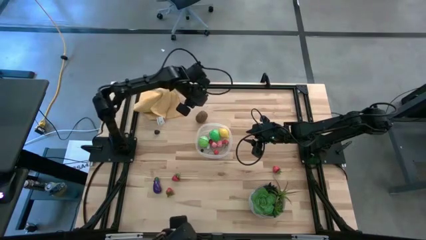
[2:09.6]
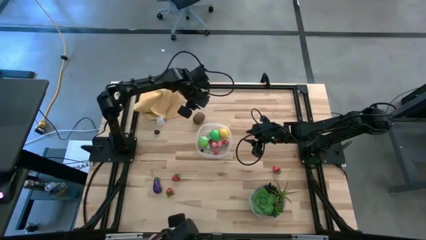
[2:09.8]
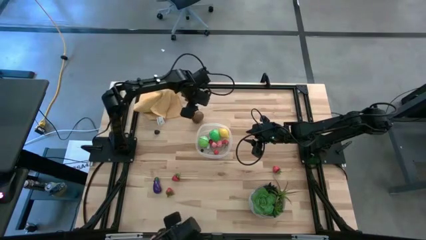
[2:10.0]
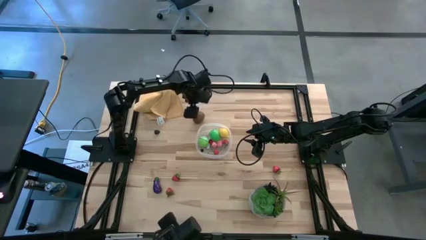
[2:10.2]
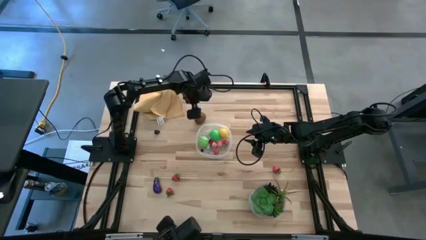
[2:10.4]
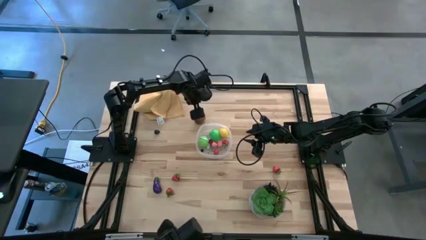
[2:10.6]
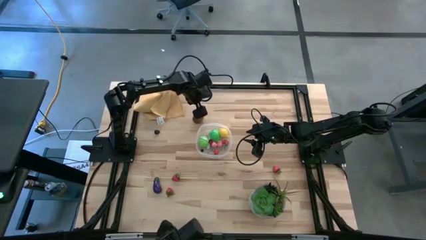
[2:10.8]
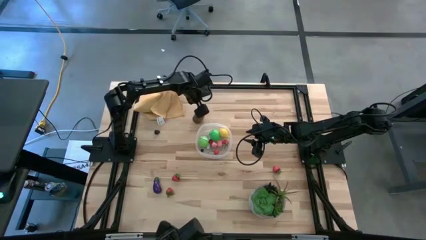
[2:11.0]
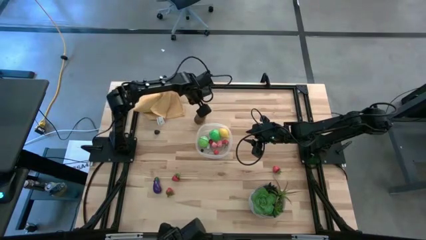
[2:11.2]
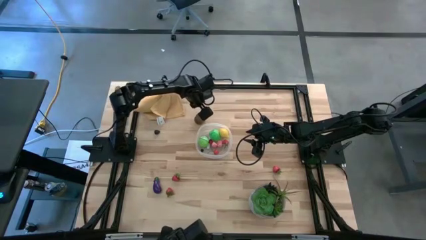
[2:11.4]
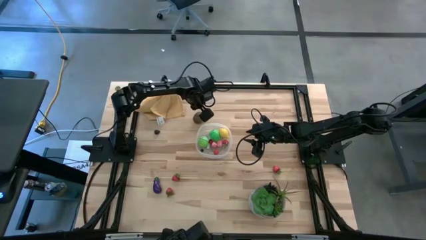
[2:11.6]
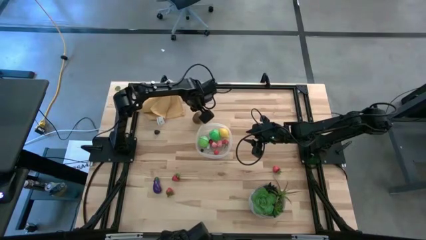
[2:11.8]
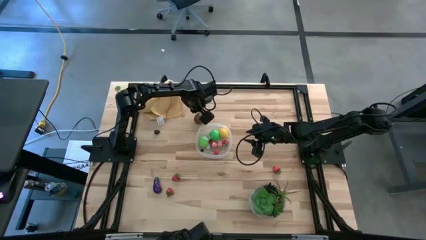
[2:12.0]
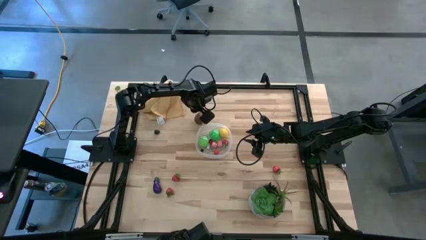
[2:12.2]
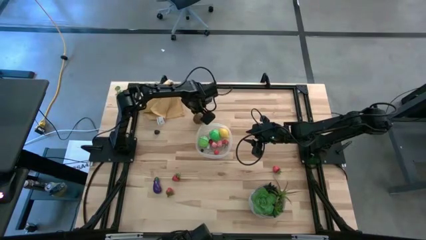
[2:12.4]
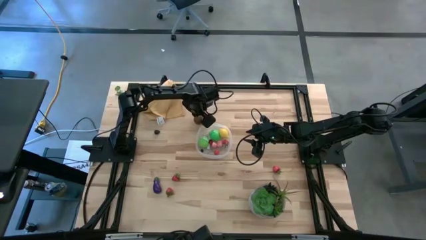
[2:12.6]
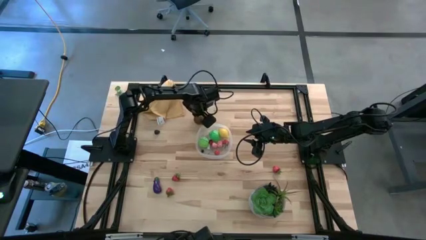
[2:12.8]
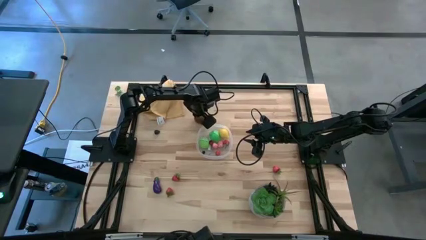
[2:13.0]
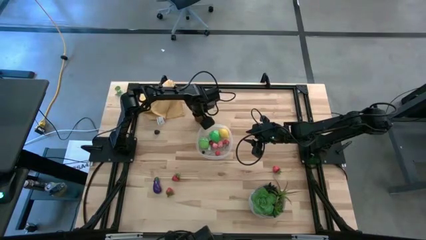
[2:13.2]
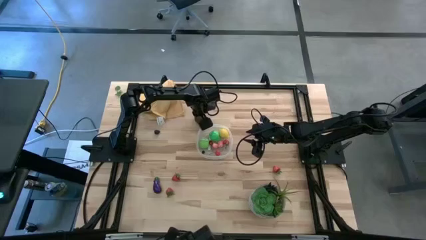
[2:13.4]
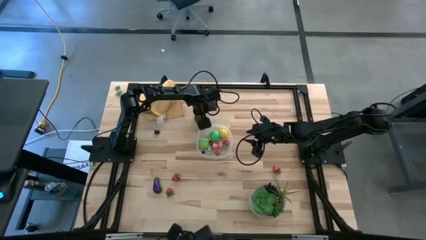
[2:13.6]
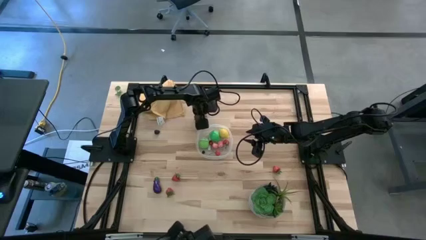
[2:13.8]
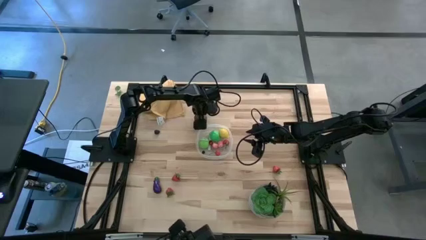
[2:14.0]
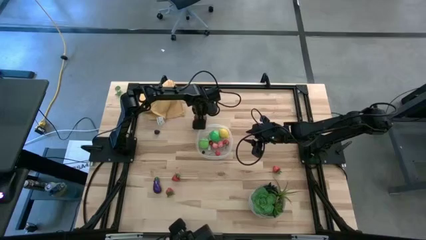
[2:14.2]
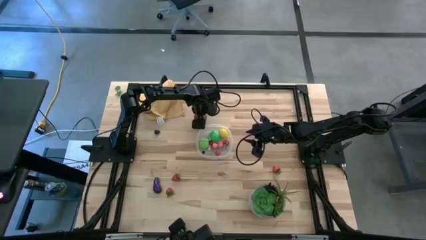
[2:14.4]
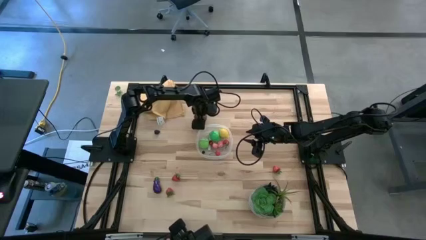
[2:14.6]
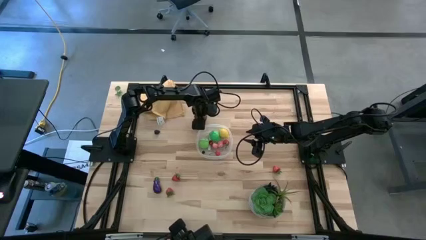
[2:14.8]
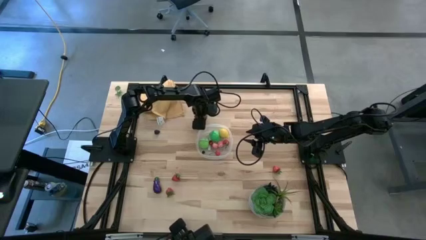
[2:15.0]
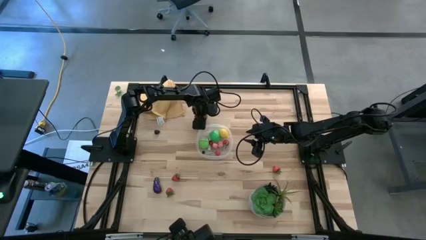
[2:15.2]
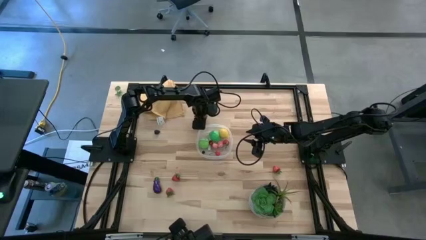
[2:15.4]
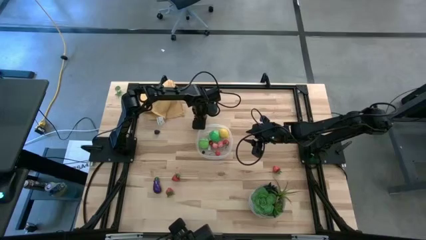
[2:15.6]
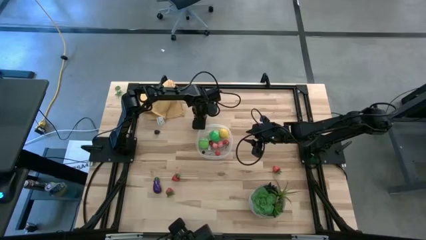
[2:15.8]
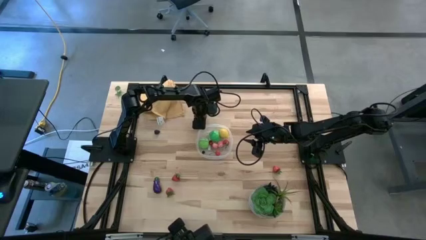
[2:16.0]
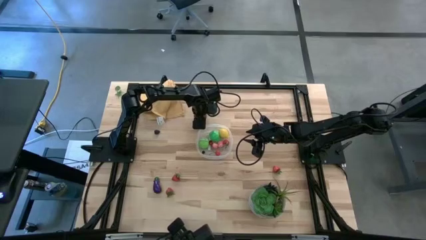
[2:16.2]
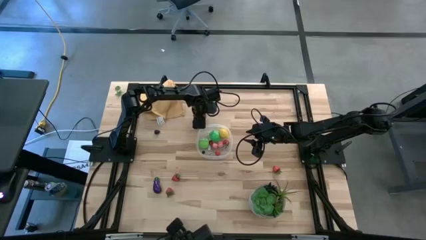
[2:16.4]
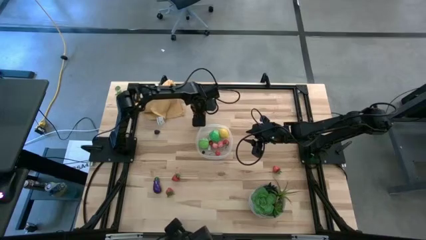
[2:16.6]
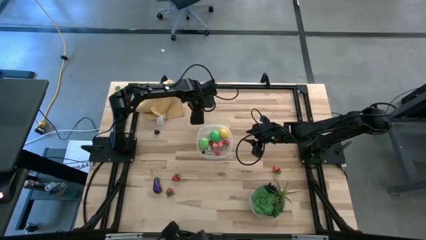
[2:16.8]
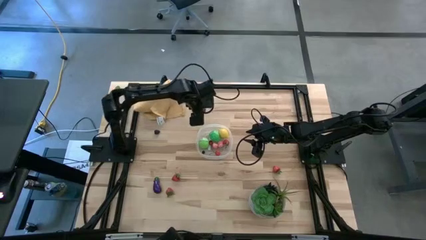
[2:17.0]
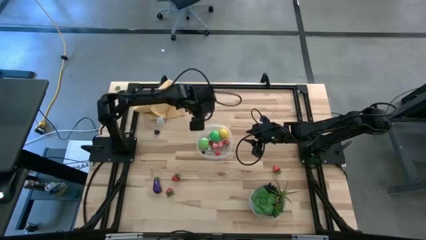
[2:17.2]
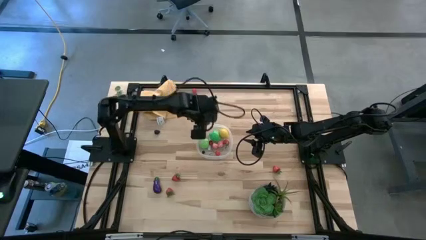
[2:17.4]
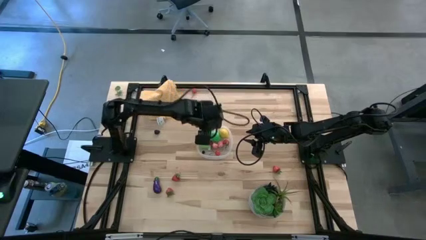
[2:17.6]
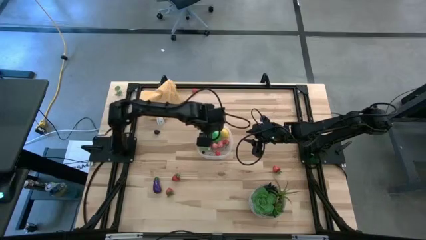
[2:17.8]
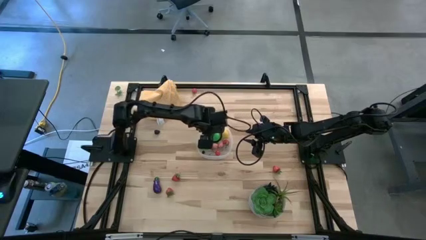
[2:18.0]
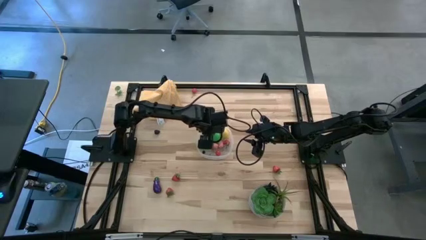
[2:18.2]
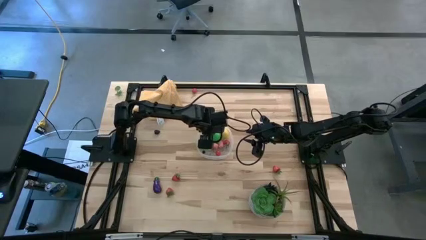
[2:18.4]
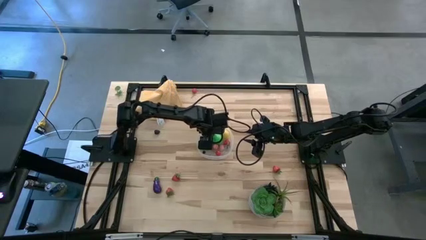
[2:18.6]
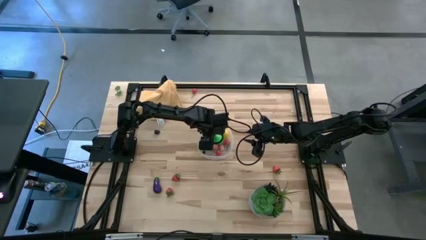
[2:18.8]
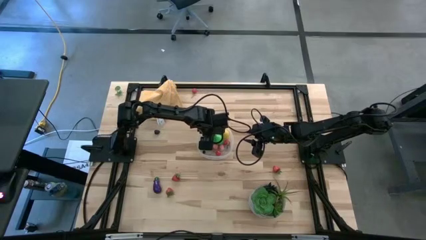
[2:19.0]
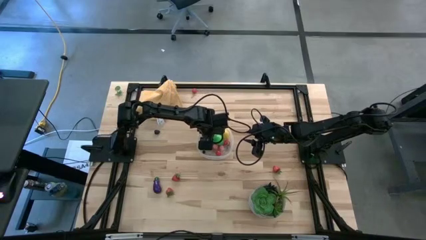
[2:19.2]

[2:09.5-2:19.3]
Task: Pick and placing Produce into tupperware
Put the kiwi into the transparent bin

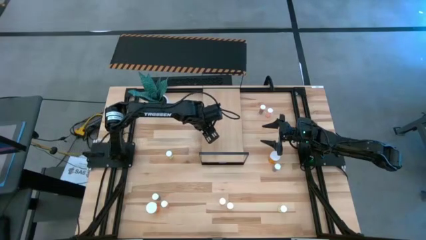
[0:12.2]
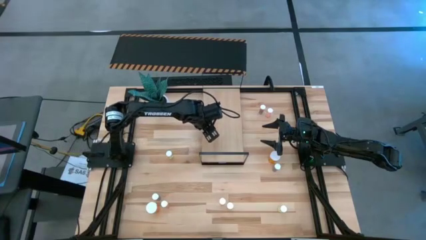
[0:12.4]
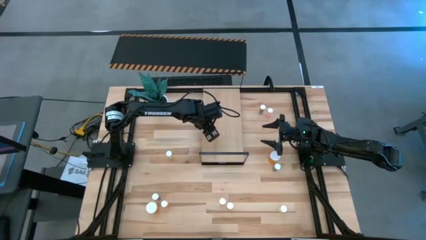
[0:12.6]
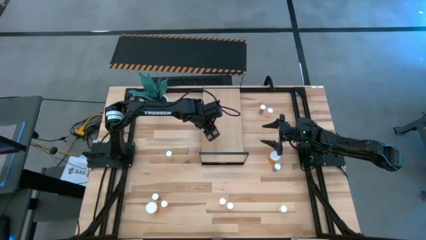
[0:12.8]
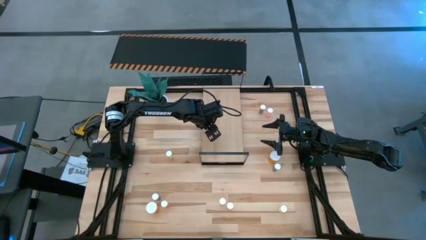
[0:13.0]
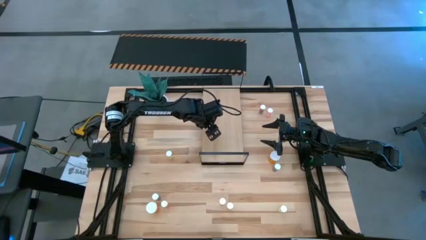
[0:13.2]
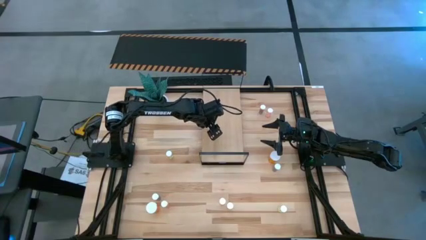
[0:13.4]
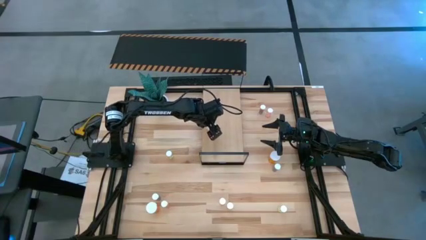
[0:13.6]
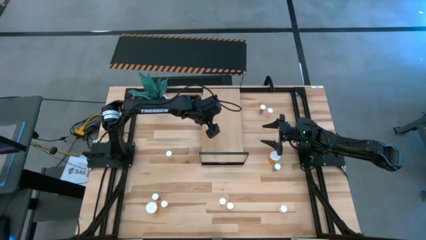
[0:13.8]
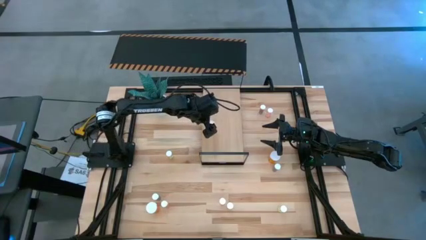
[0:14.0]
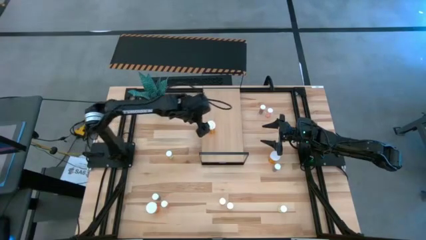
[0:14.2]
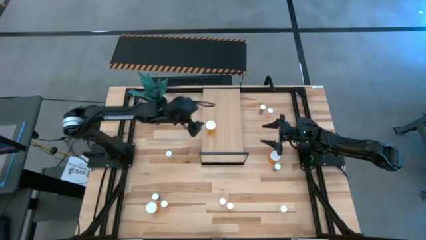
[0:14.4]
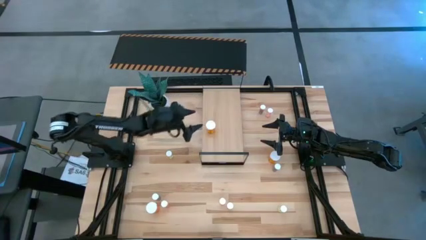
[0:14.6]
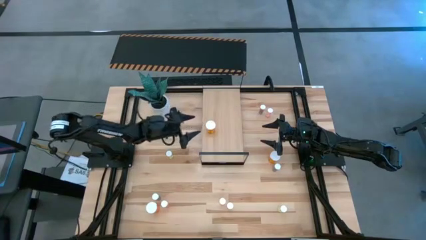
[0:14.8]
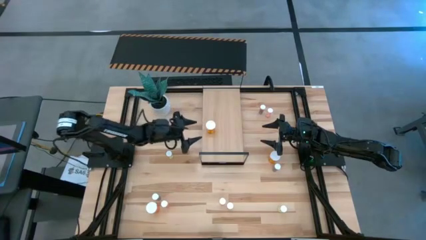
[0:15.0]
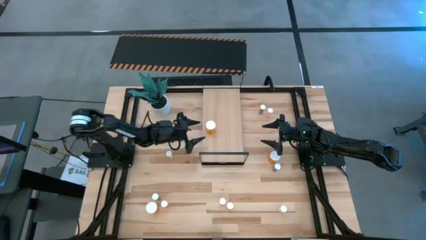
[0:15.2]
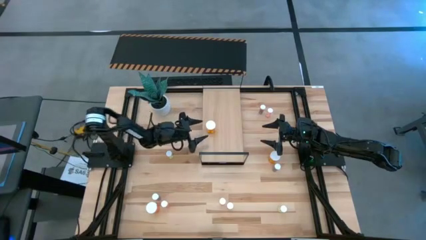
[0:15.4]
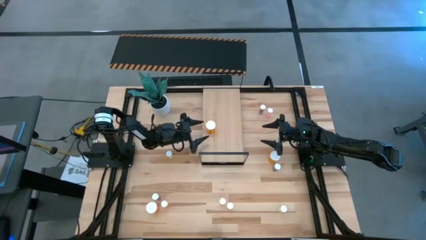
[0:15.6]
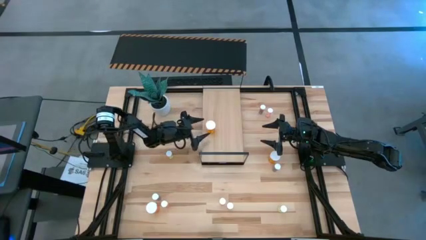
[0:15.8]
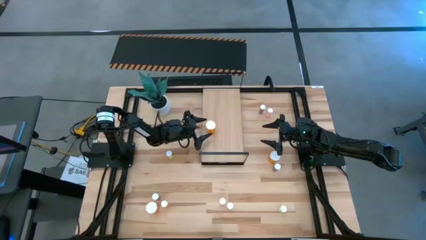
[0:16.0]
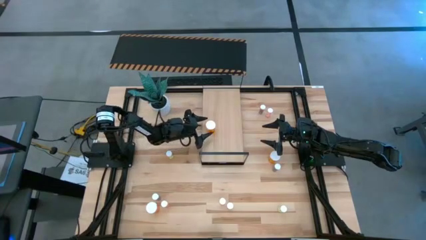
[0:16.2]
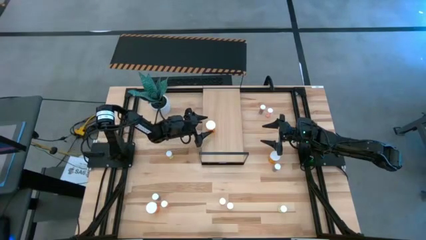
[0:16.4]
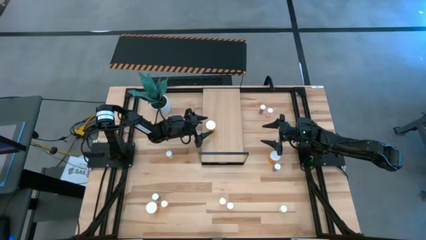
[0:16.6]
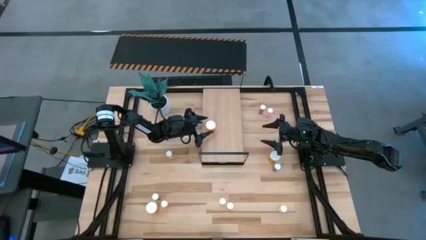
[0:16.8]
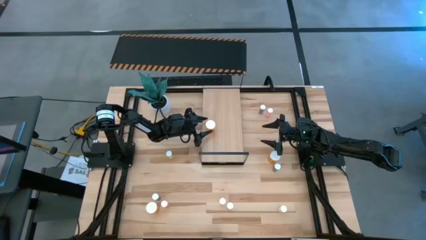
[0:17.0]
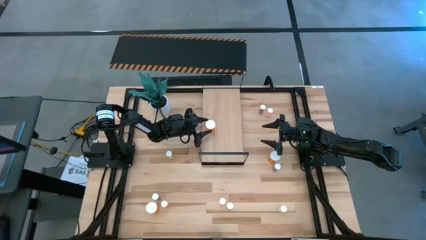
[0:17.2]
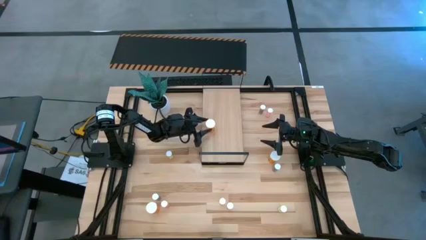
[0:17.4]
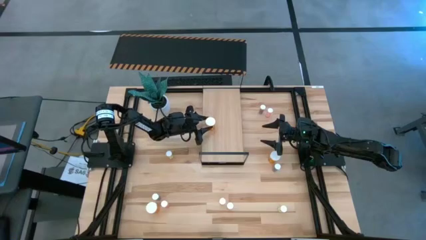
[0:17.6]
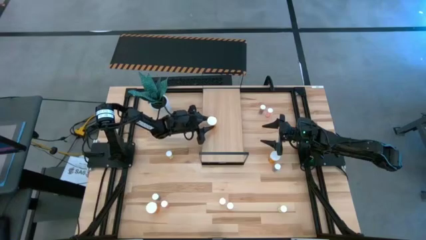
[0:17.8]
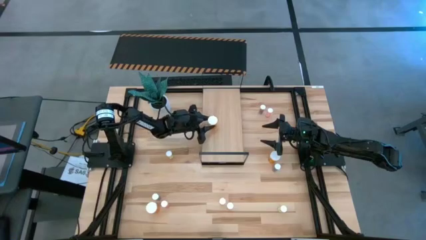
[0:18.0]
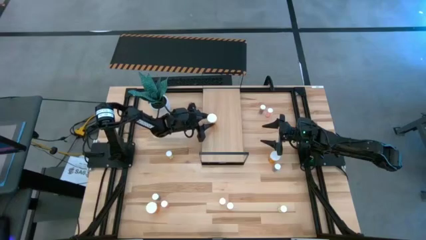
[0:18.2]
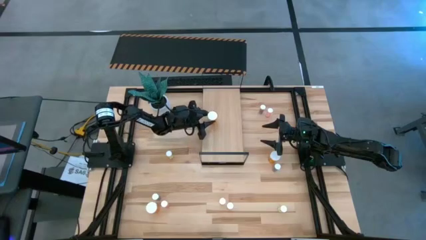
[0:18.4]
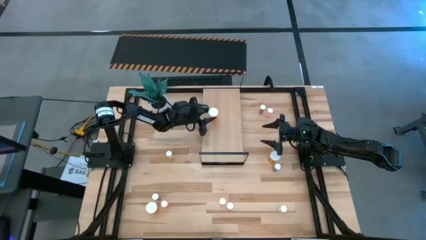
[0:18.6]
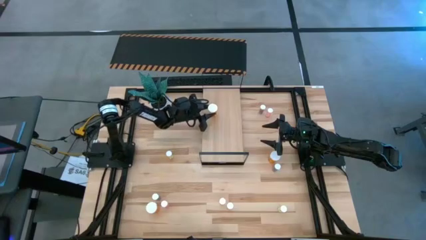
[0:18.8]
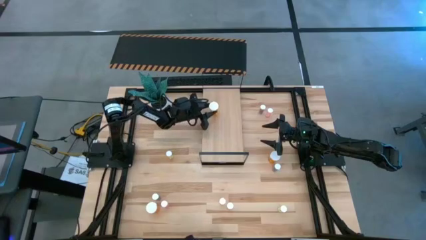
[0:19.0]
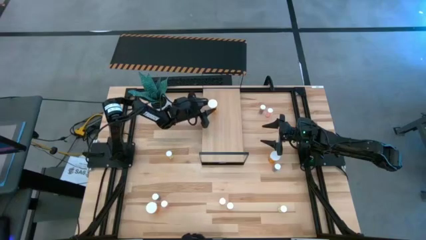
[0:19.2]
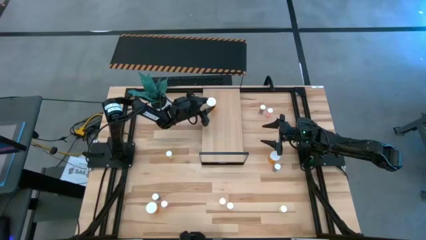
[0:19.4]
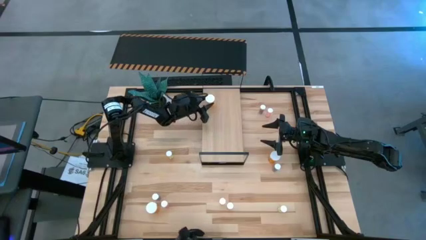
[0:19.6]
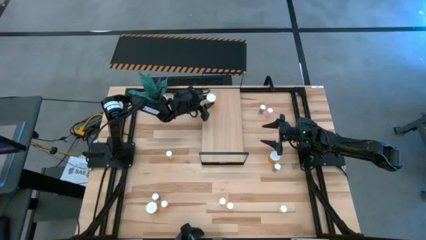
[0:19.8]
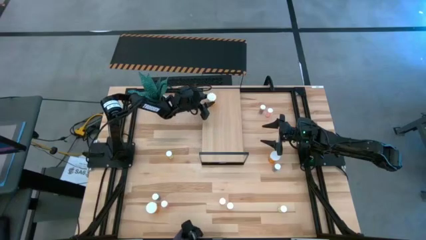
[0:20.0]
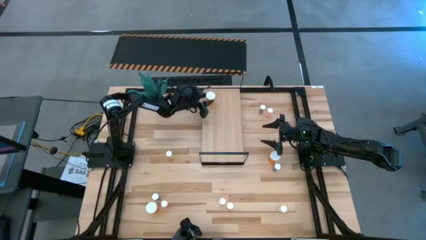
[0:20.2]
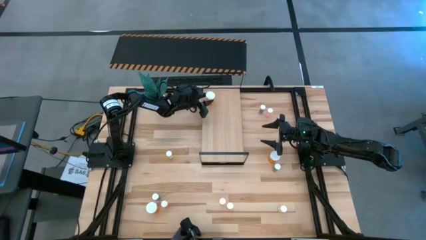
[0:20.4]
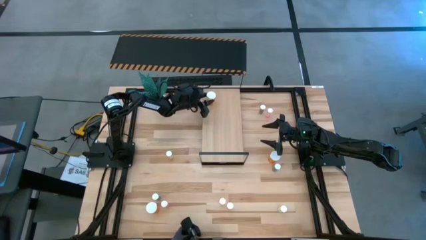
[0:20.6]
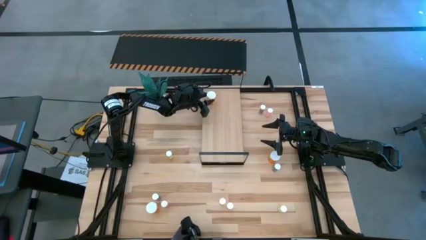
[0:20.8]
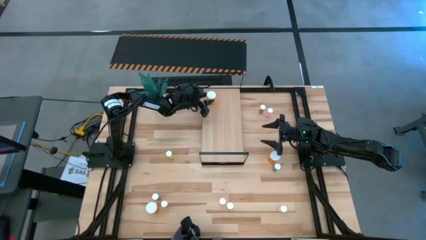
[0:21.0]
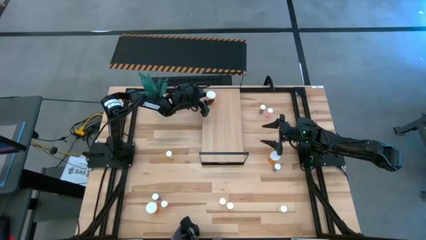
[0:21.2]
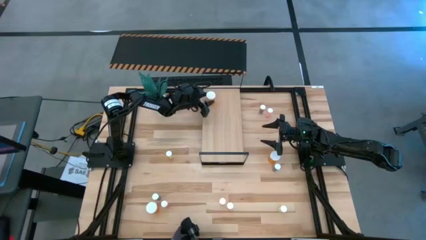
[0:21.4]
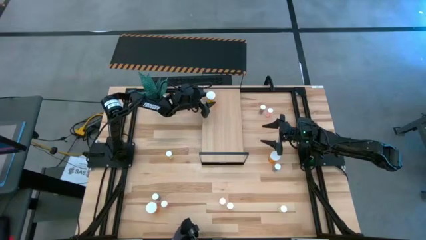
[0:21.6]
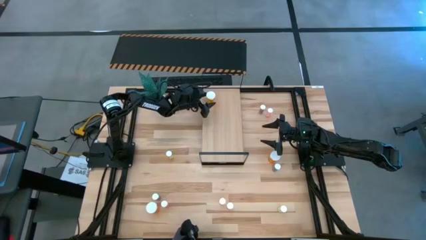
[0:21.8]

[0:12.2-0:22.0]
Task: Pick and place medicine bottles onto shelf by color
Put the top left large orange pill bottle on the shelf
